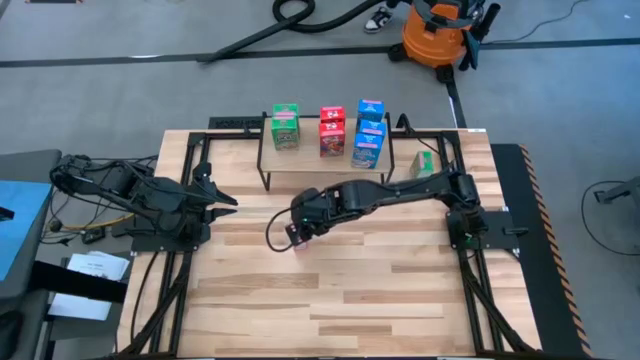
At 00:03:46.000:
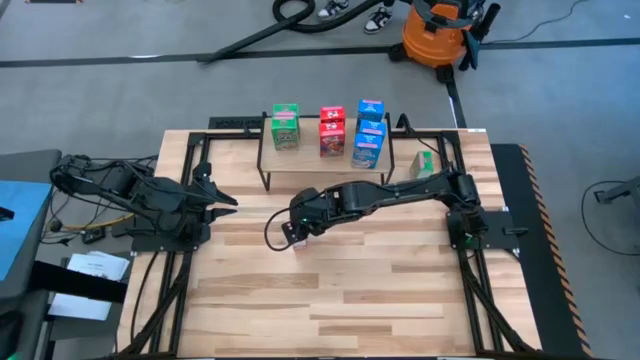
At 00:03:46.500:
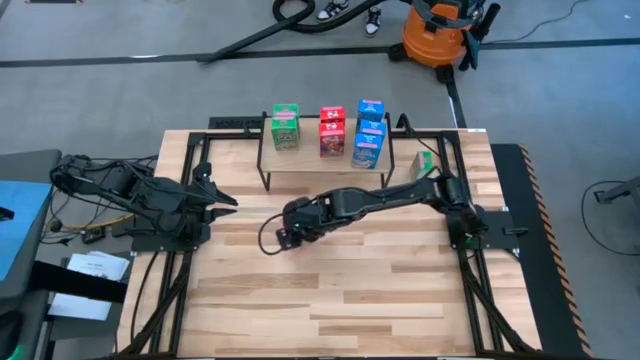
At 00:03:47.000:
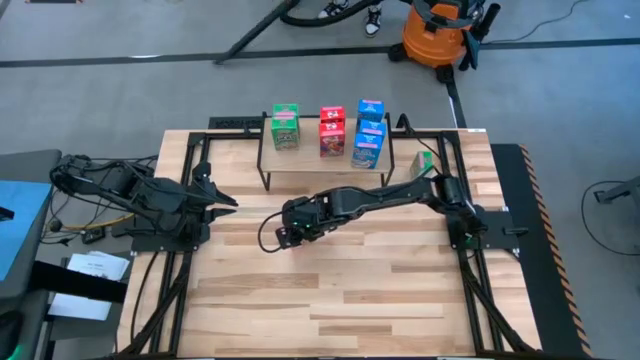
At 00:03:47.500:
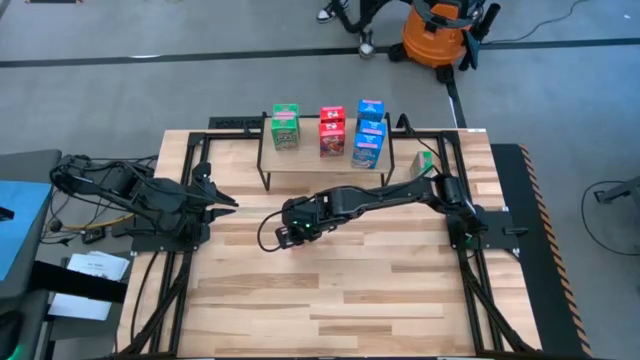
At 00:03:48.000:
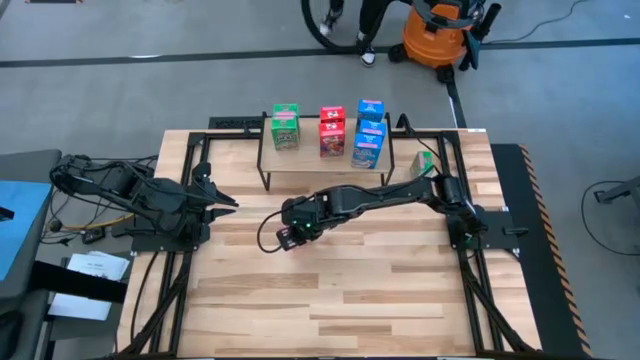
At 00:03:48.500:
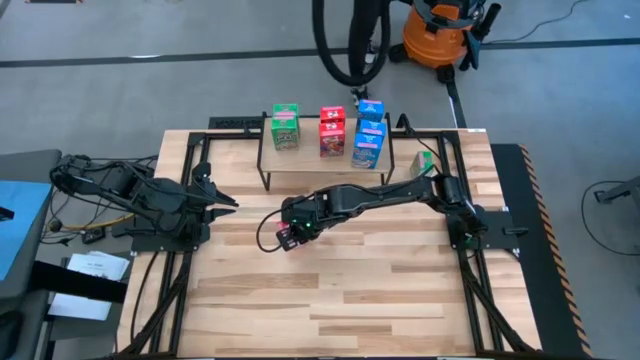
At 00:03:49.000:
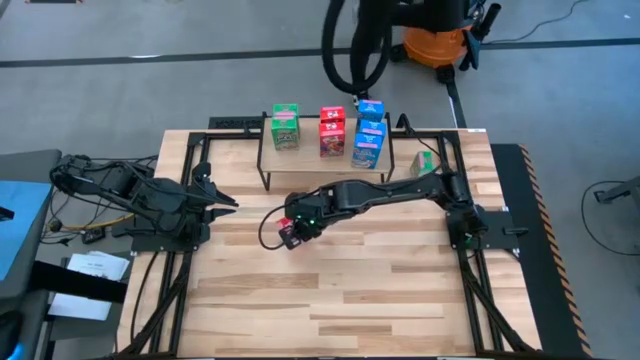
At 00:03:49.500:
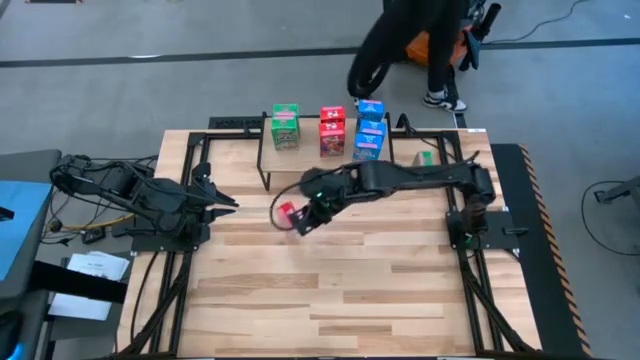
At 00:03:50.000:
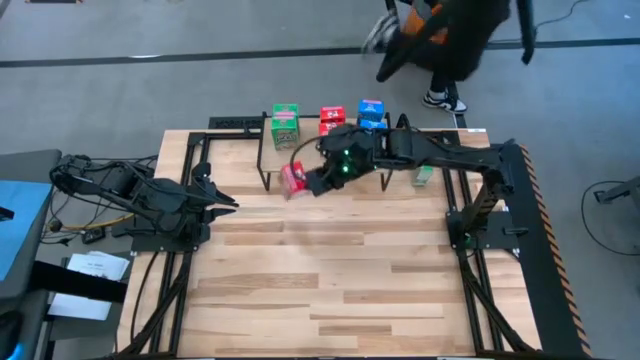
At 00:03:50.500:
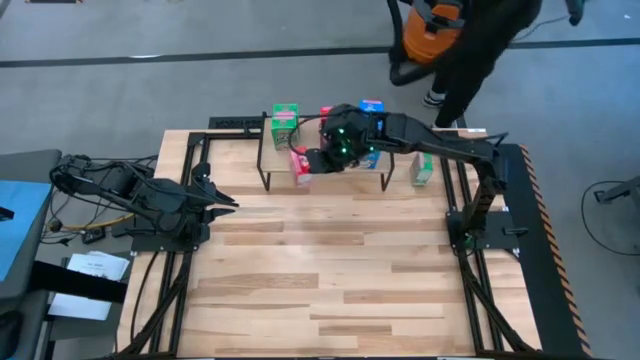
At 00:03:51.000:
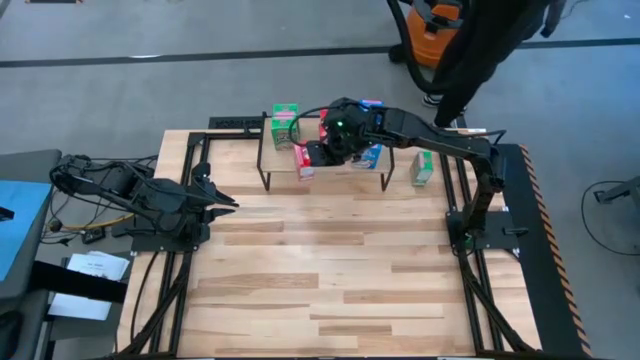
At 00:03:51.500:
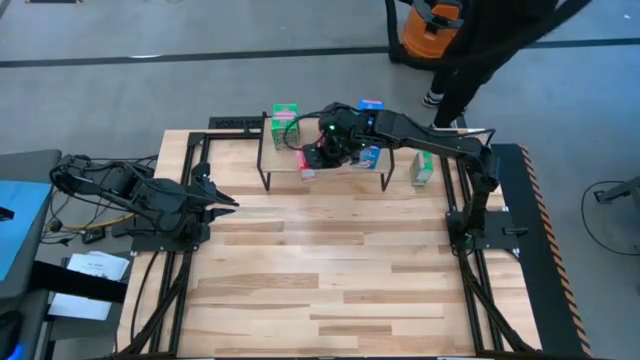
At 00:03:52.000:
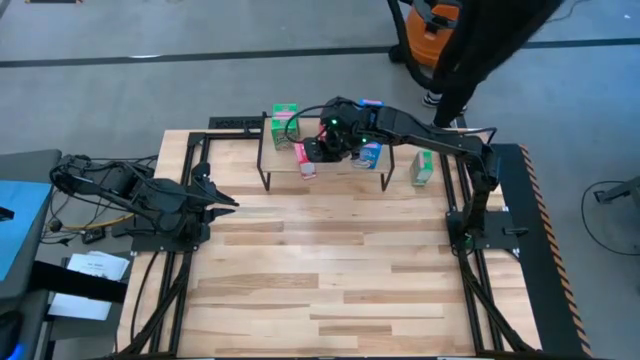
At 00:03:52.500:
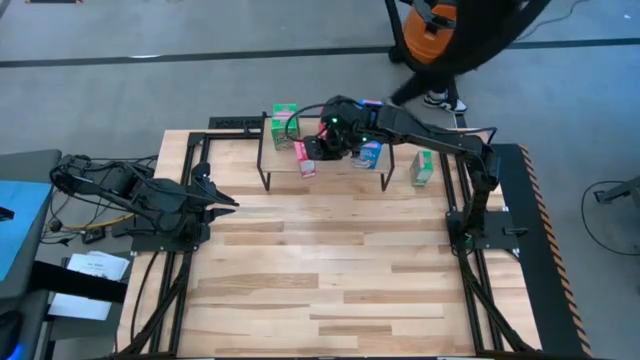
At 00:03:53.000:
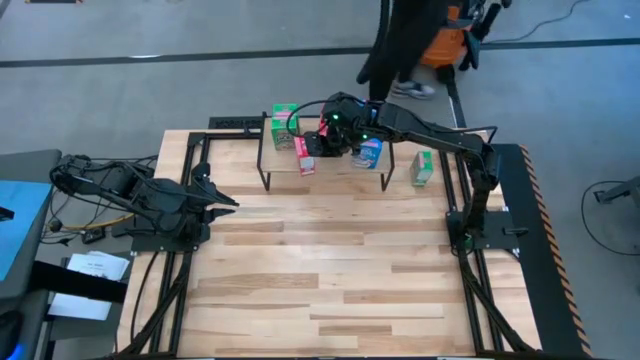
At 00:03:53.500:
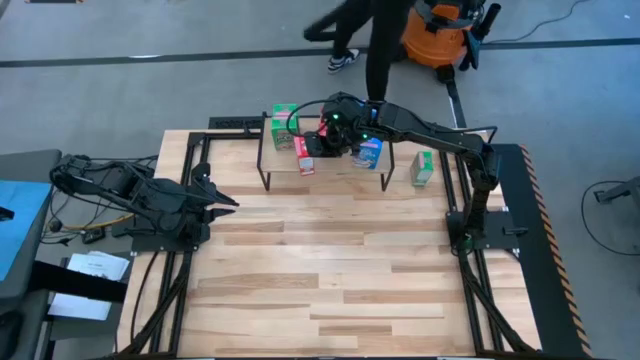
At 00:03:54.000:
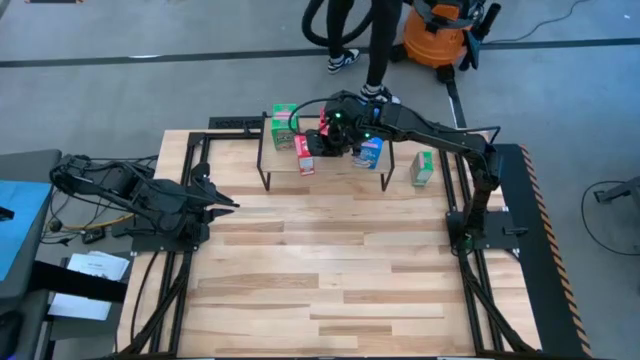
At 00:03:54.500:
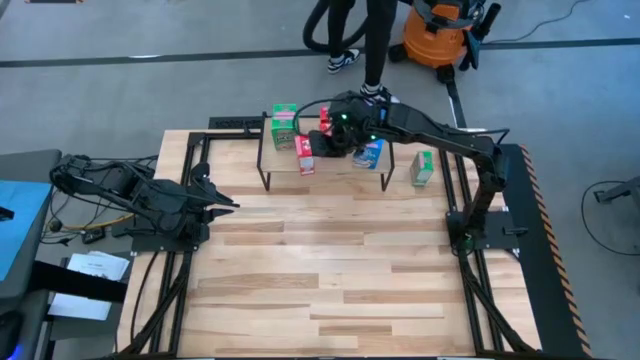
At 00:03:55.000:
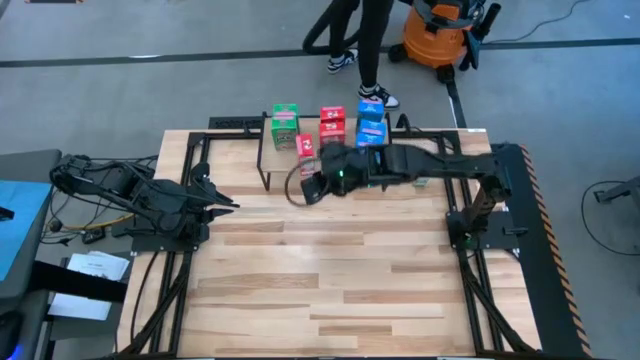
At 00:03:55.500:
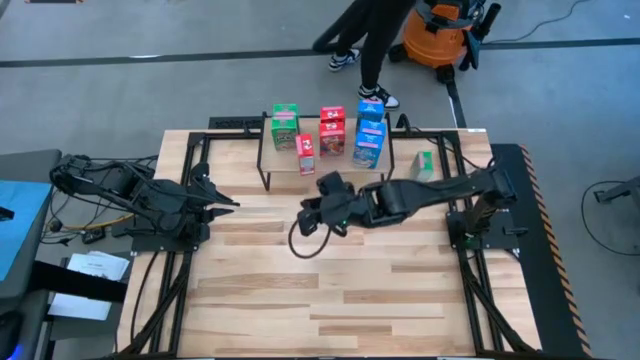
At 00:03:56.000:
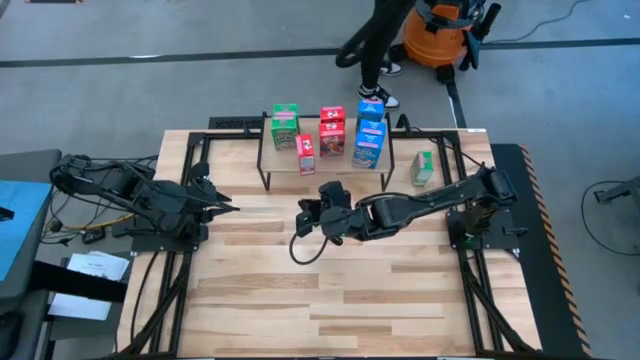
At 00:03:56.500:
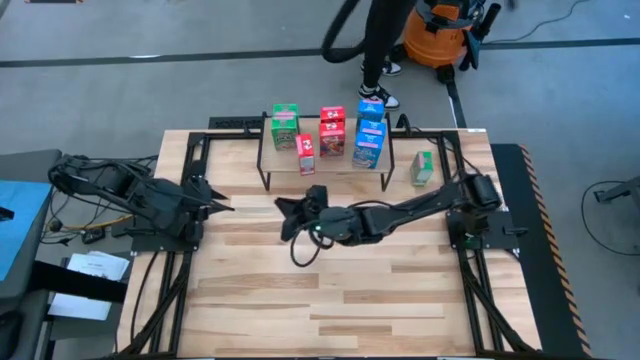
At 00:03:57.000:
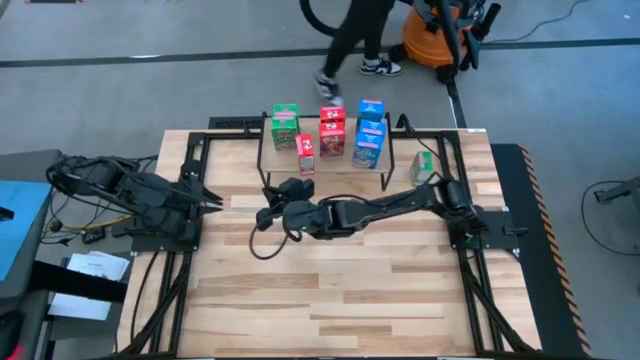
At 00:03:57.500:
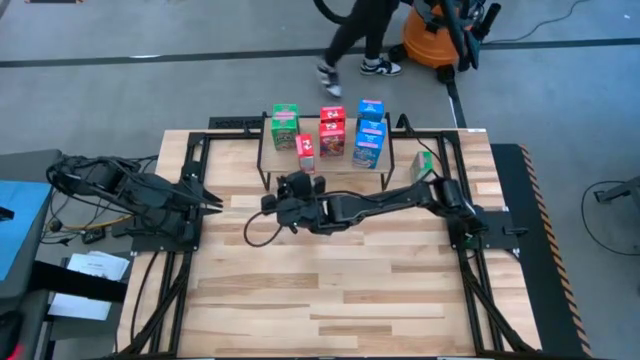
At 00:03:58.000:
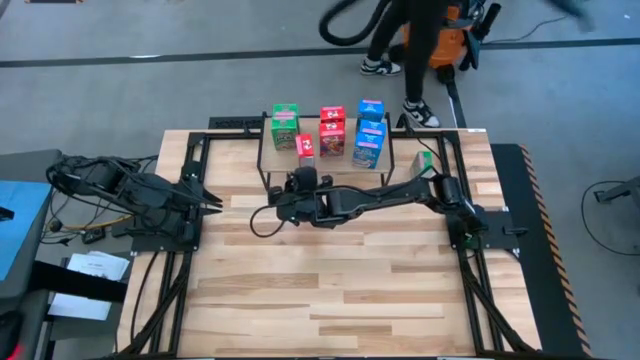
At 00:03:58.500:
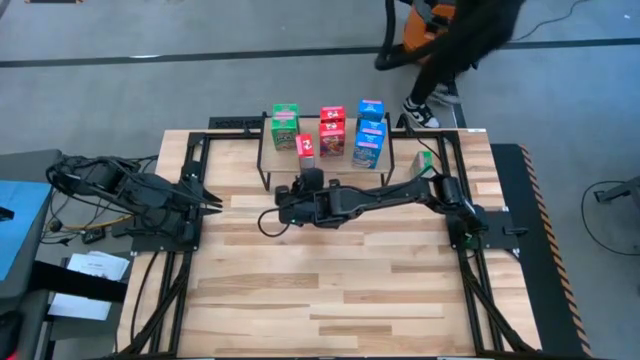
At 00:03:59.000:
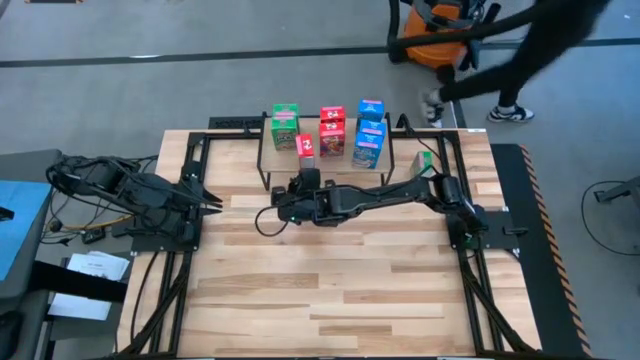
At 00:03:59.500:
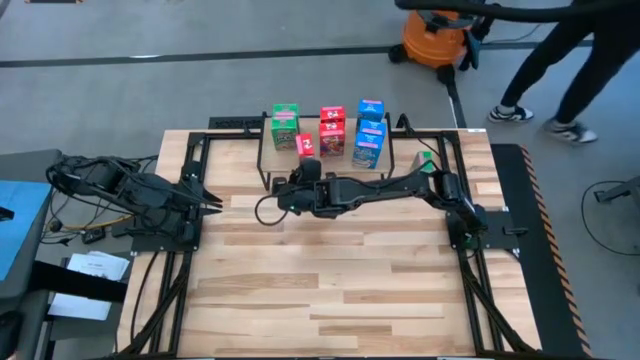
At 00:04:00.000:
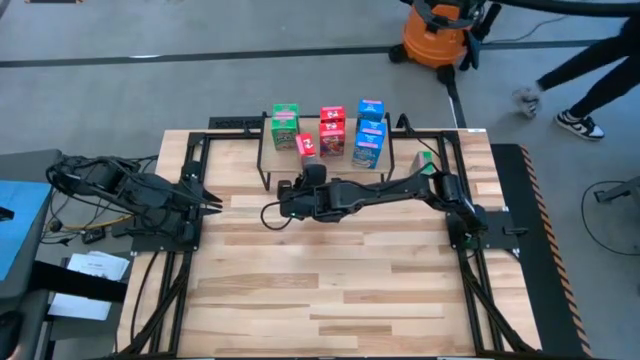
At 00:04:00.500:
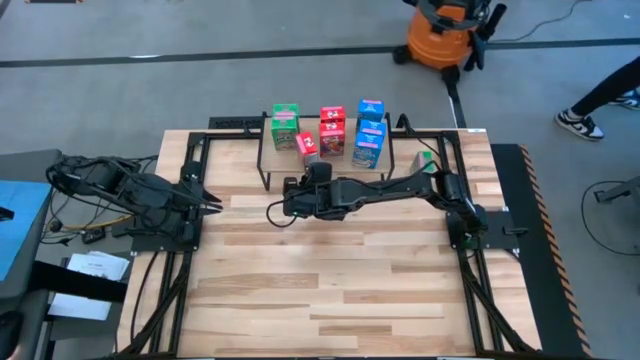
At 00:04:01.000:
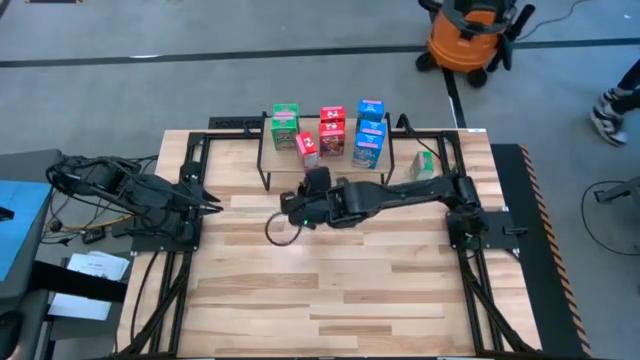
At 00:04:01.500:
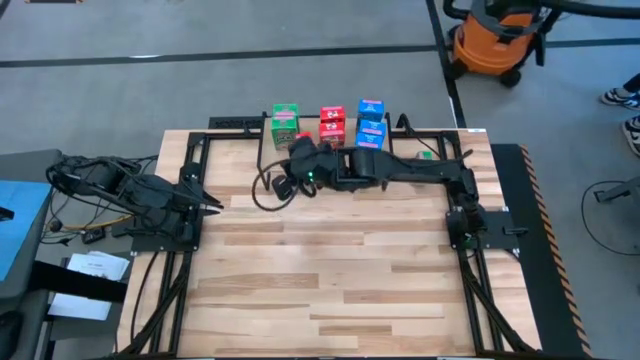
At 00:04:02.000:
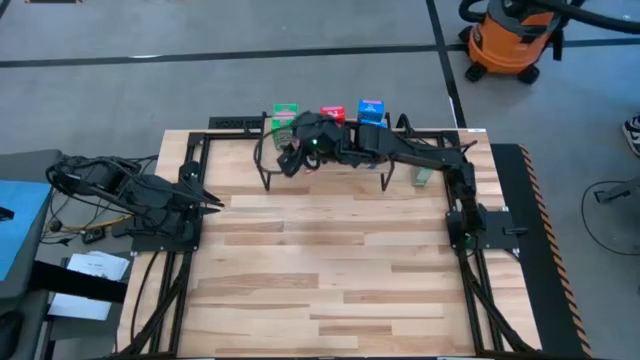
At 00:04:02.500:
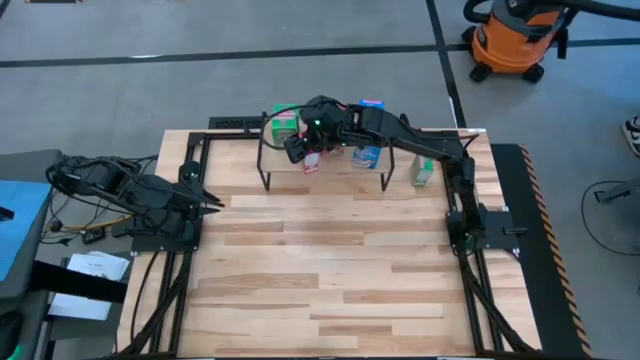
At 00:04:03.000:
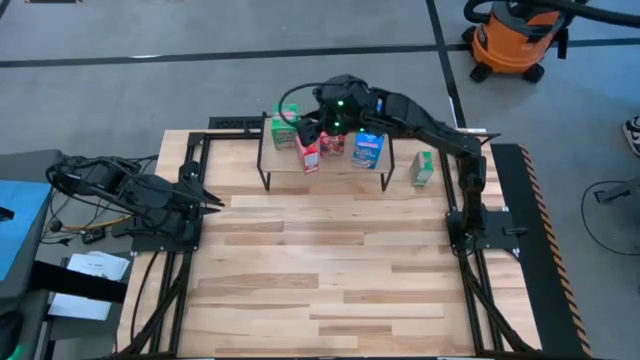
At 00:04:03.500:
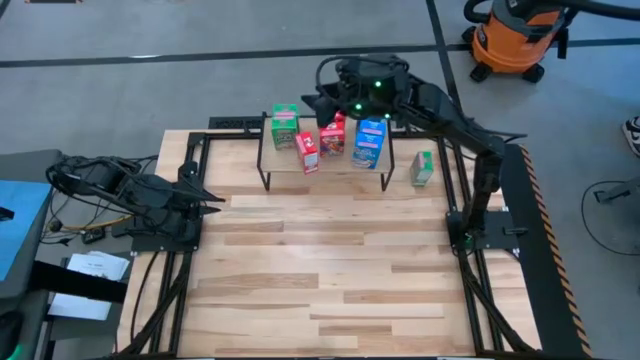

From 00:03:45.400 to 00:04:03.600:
Task: Stack cereal on shelf
Put the red cereal box on the shelf aligned with the other red cereal box
